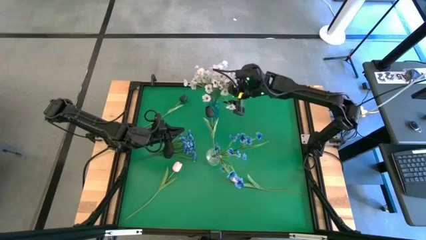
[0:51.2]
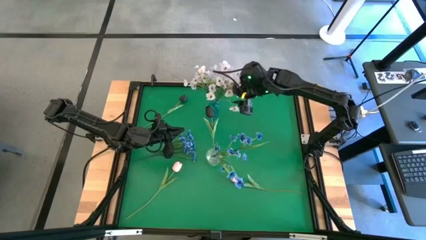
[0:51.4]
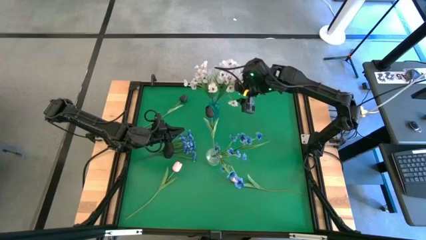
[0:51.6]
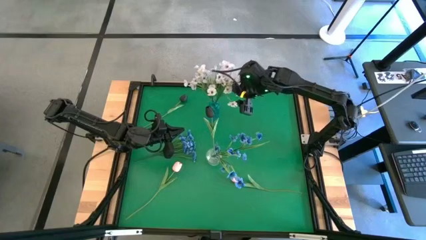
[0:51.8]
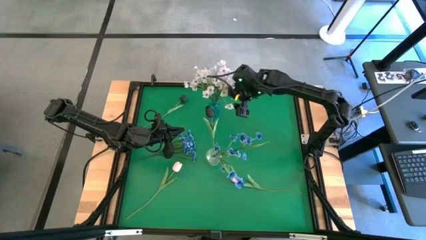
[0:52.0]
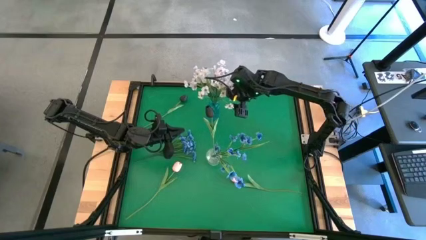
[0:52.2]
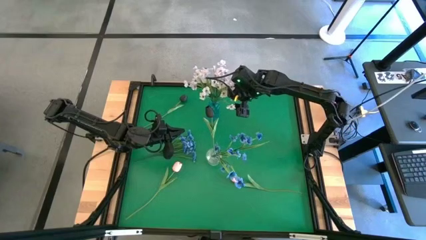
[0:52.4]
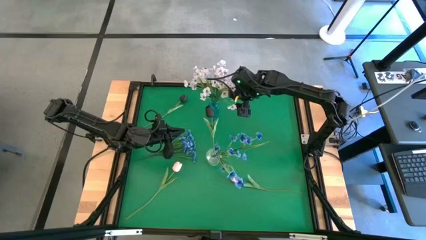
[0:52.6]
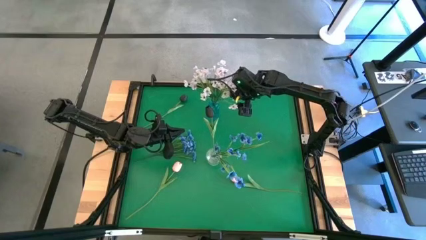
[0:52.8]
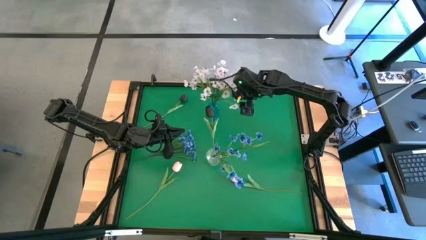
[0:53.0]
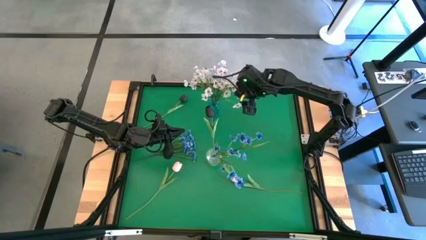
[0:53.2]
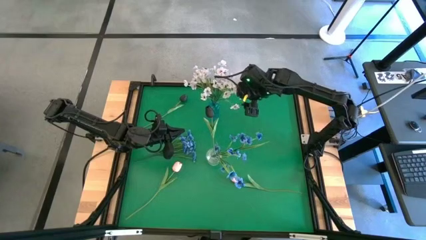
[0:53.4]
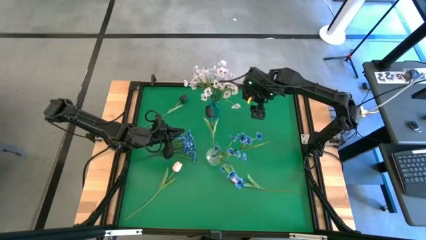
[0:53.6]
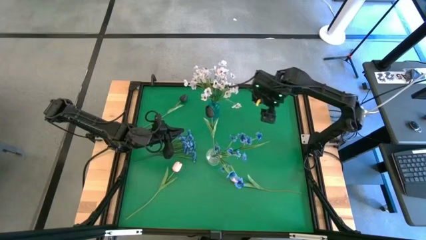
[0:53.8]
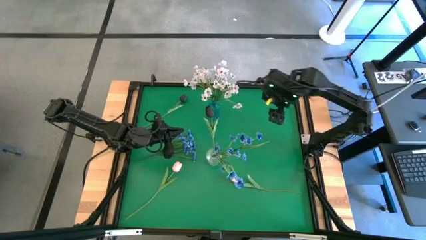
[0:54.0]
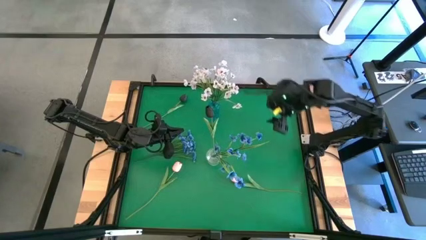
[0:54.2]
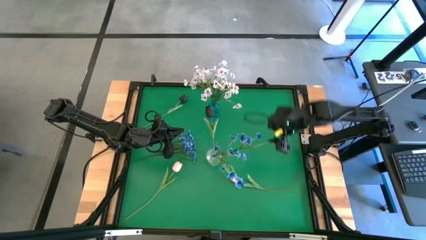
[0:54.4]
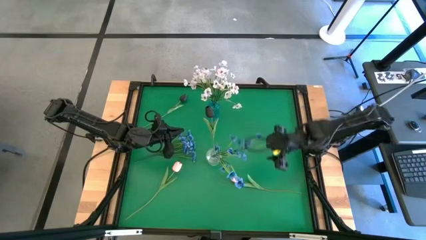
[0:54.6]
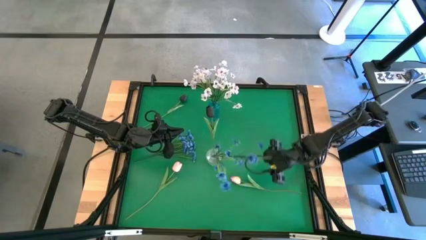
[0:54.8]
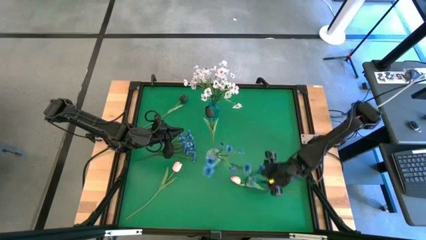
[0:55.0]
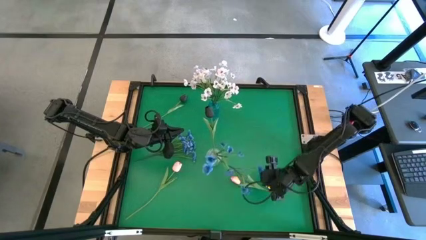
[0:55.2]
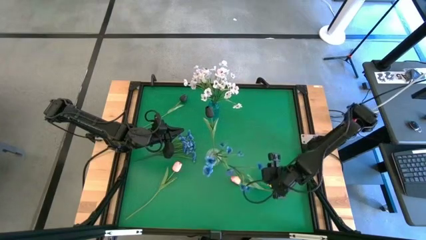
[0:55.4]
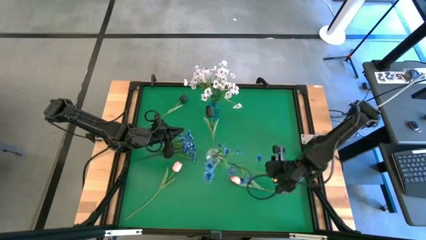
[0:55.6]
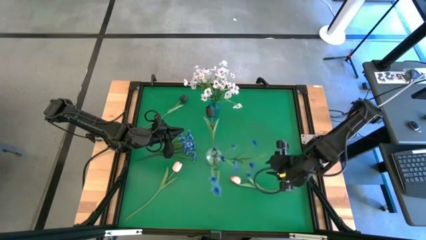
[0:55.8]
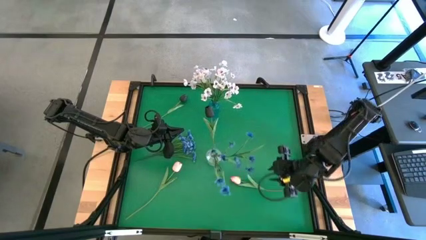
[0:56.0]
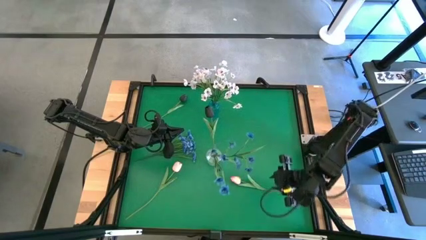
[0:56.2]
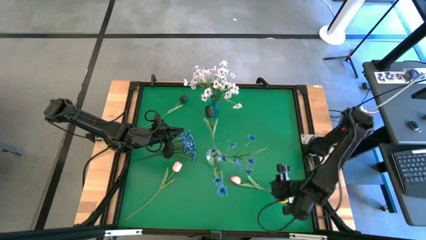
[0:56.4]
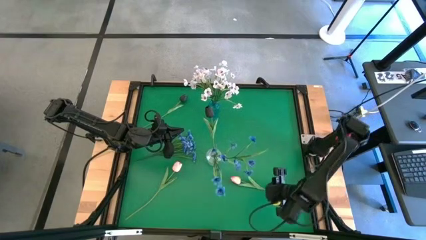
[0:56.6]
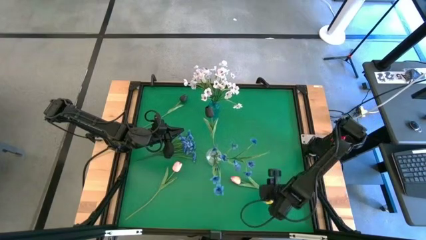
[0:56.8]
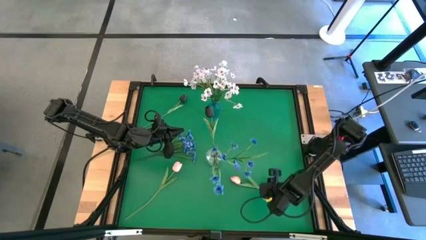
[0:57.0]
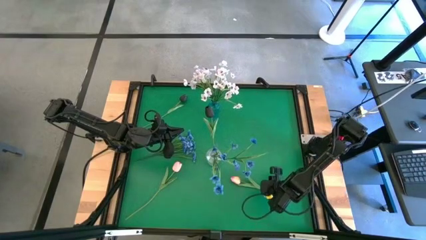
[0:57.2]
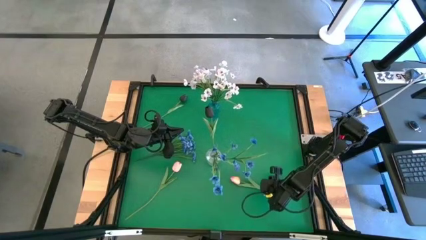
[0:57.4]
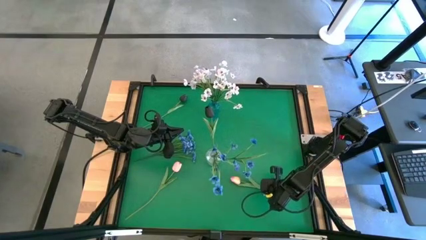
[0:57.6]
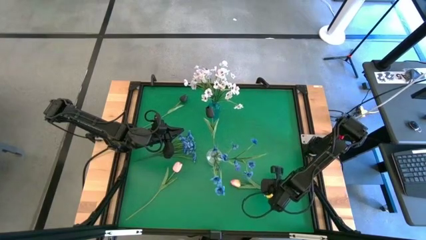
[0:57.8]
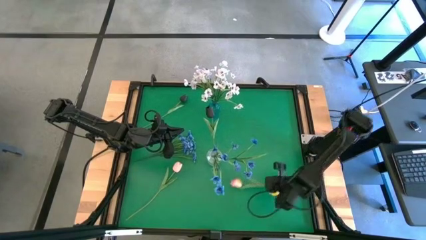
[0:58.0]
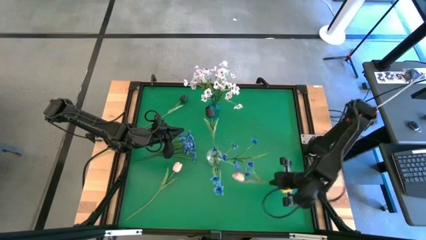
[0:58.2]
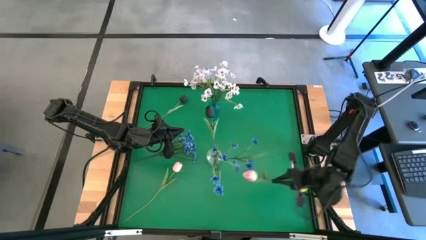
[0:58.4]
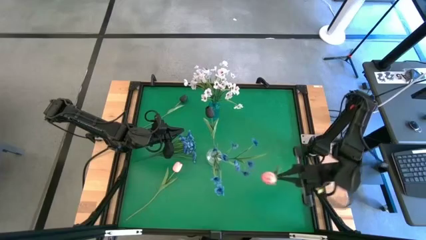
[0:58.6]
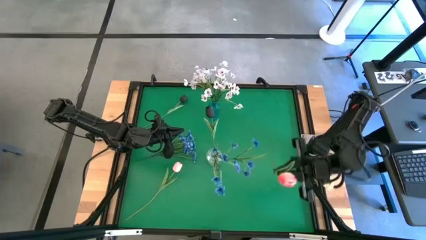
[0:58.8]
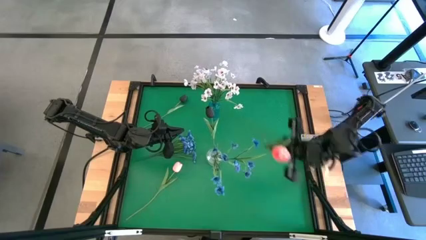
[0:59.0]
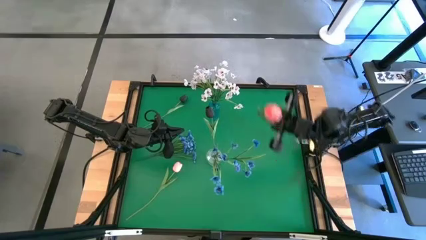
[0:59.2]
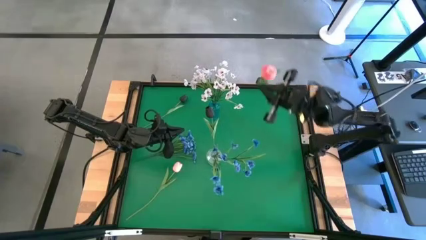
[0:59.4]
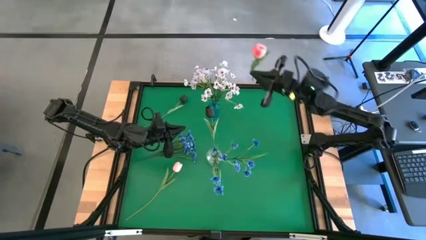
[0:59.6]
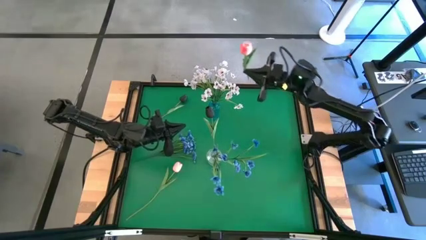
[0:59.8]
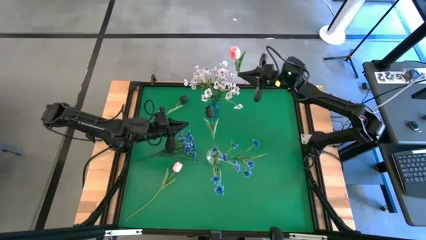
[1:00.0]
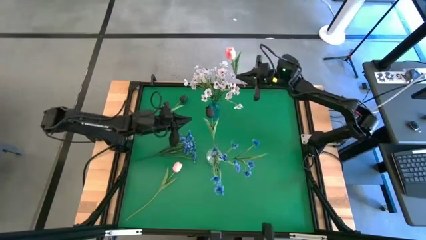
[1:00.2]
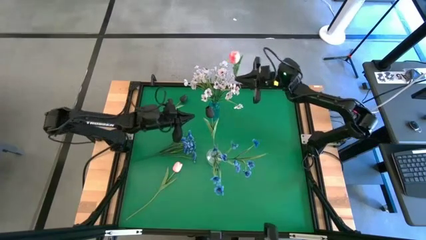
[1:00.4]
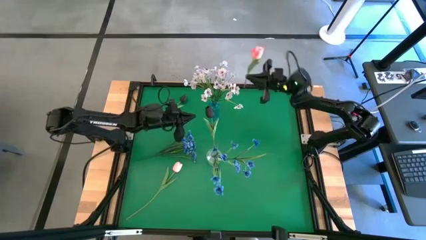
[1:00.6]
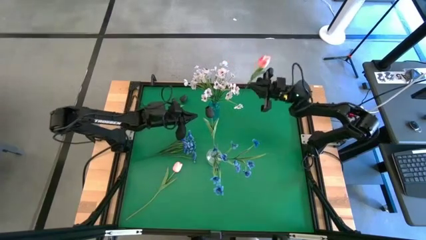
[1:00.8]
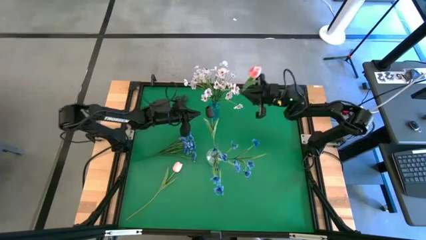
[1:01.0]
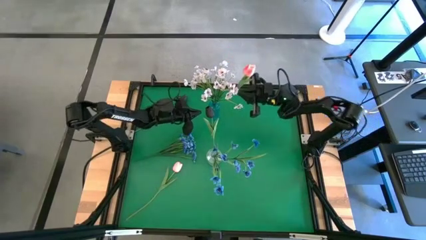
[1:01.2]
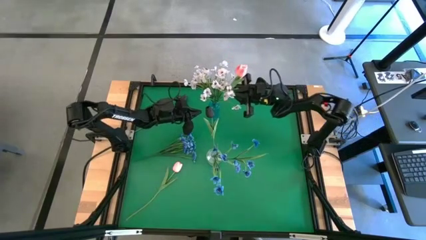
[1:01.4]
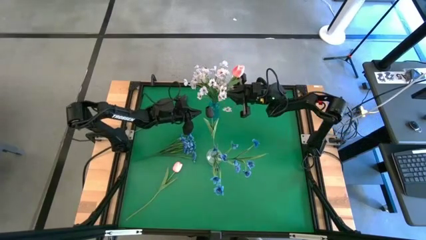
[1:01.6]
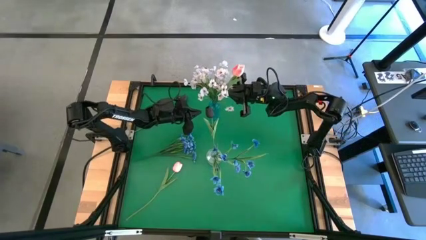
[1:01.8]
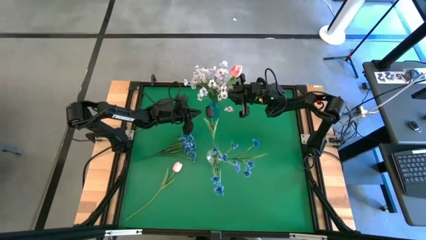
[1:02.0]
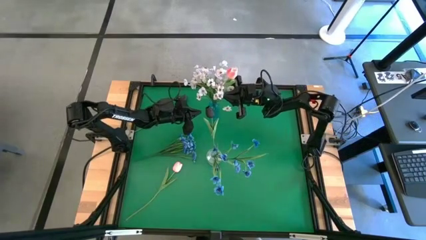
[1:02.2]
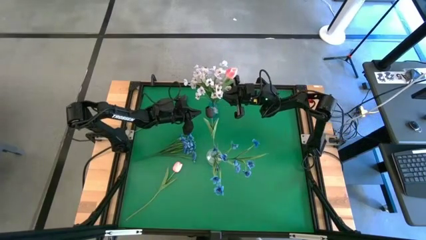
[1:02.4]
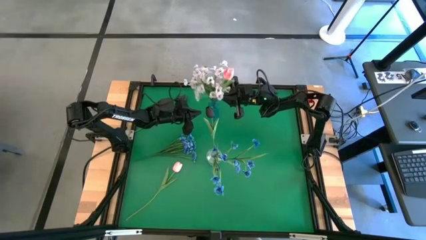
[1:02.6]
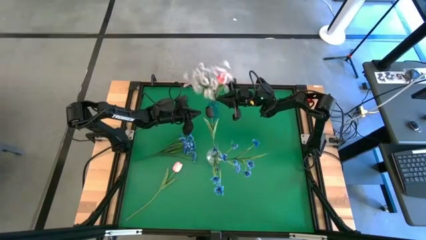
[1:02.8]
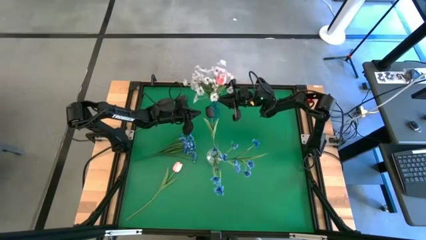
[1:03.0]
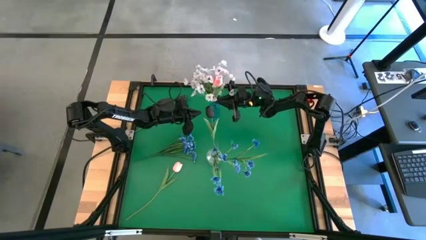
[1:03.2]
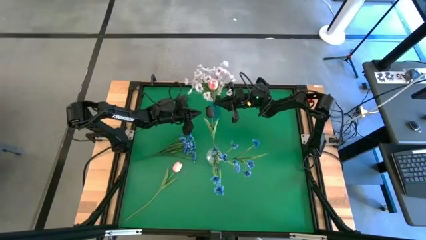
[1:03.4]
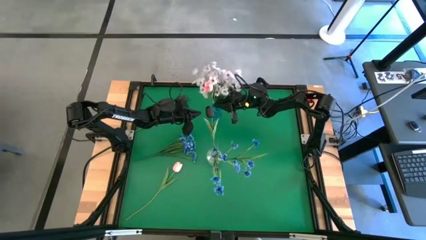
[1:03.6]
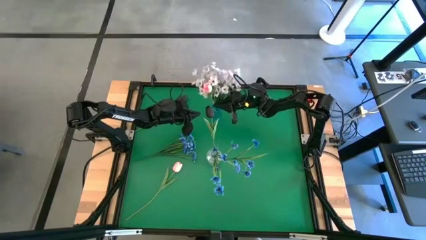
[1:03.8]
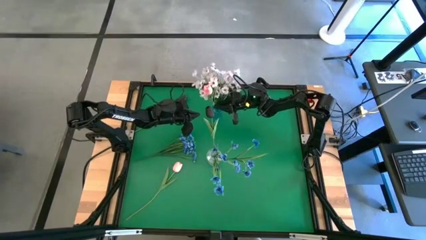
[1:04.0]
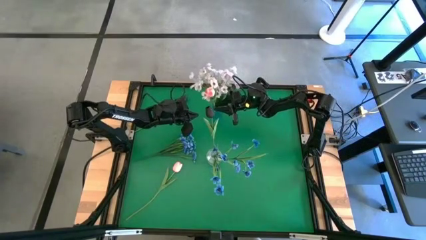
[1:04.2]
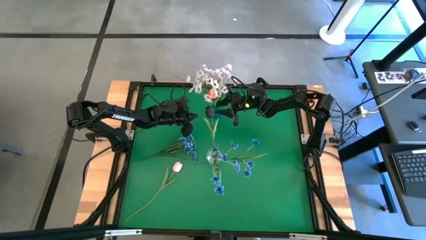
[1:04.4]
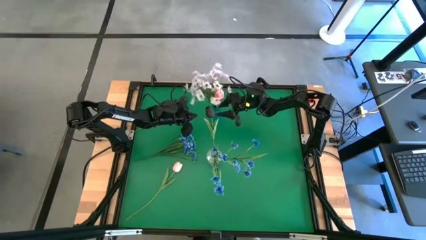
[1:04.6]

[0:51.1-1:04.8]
Task: Sort flowers into vase by color
Put the right pink tulip into the blue vase

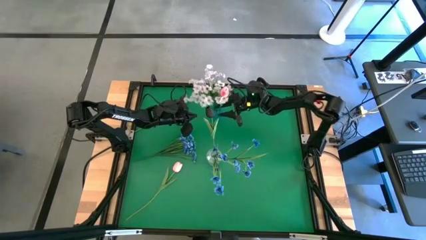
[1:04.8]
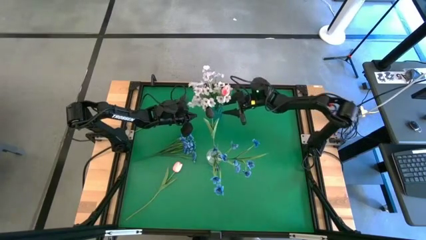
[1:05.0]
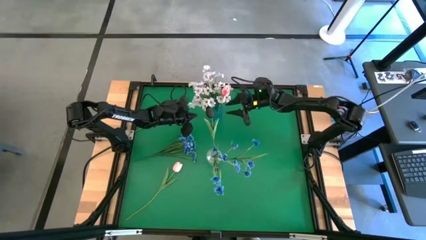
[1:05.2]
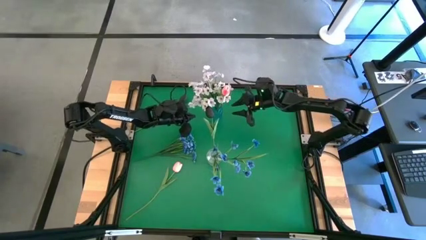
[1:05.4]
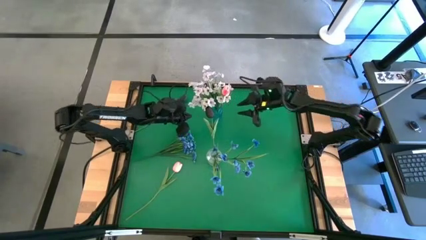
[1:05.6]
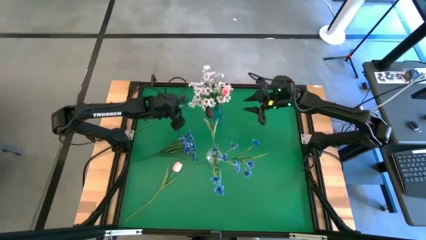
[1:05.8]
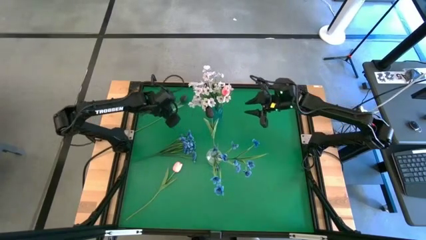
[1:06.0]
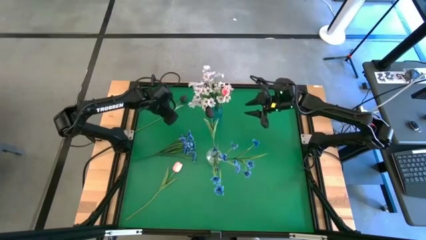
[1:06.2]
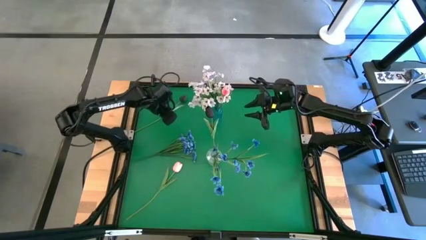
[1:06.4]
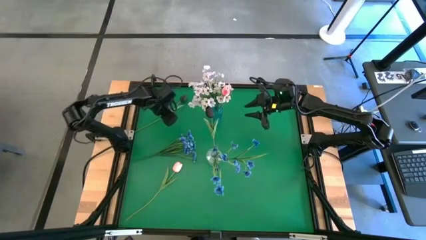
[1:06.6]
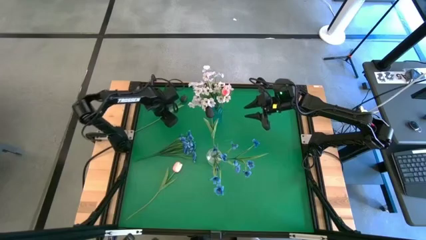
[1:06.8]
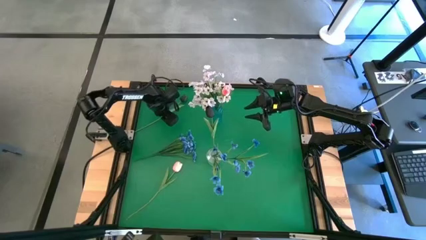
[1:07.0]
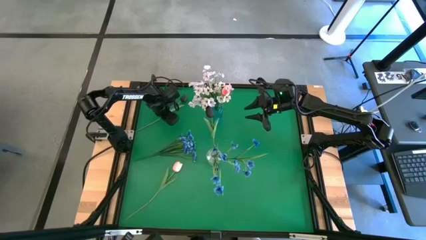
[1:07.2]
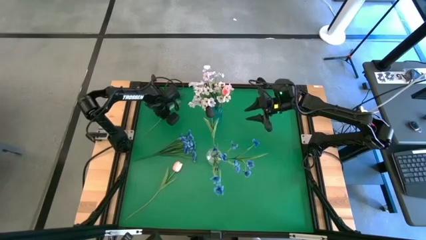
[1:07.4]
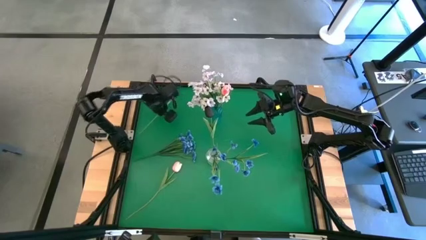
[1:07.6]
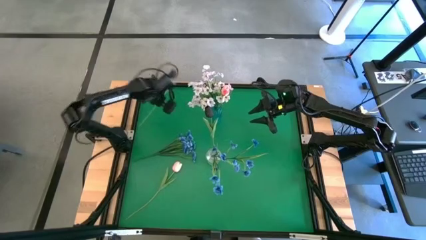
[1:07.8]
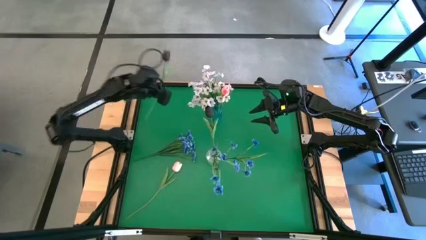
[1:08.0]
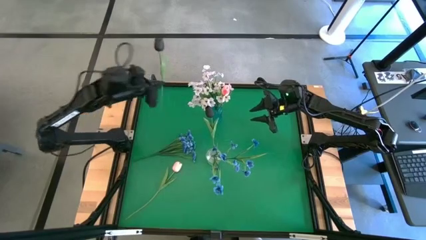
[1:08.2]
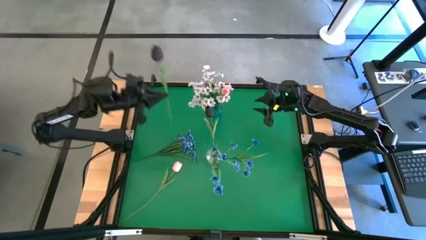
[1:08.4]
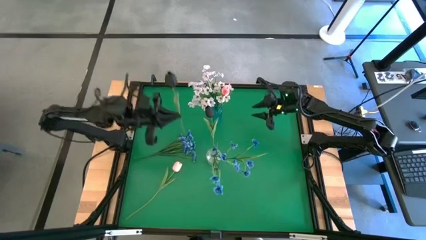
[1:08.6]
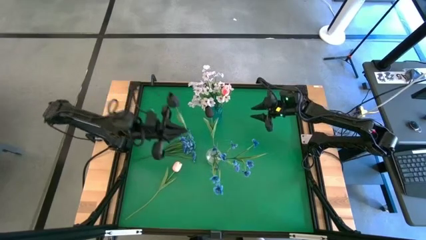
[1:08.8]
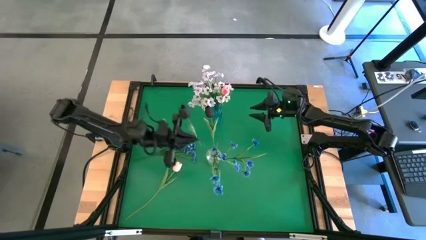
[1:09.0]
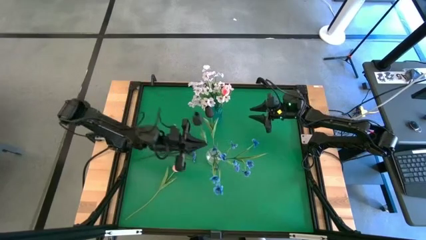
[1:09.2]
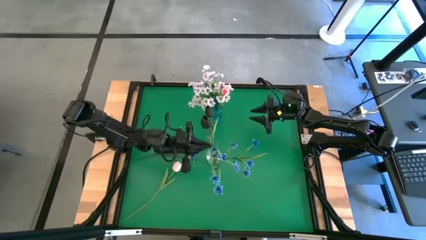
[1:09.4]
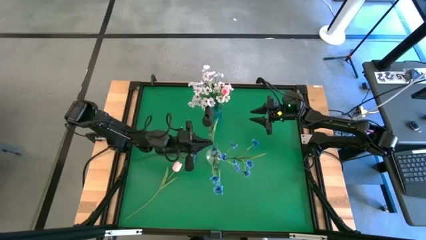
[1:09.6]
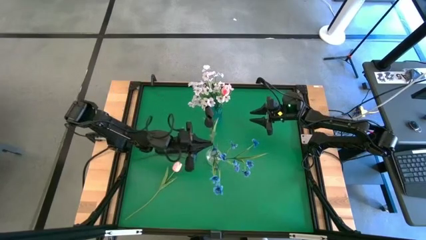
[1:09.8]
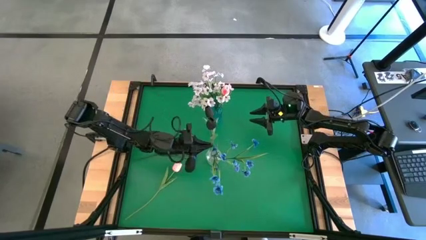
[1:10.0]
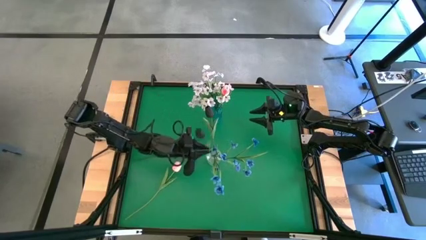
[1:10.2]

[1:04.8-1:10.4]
Put the black tulip into the transparent vase
